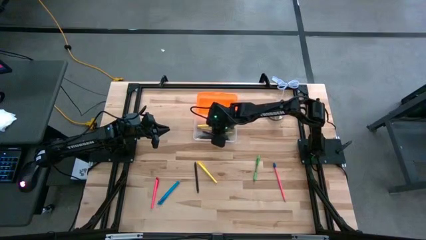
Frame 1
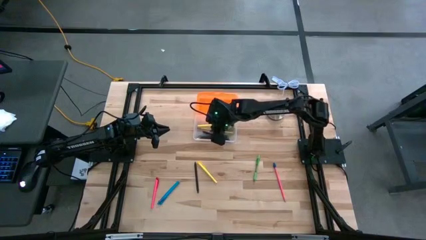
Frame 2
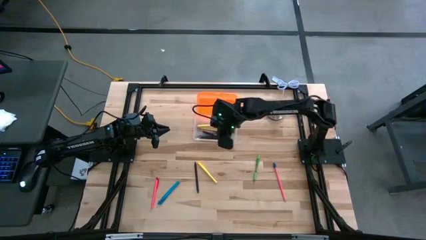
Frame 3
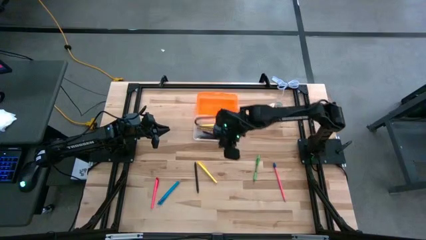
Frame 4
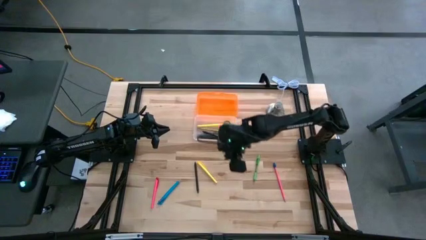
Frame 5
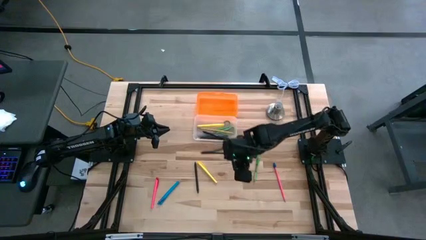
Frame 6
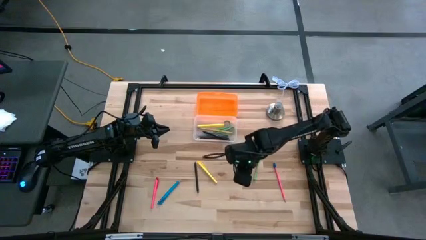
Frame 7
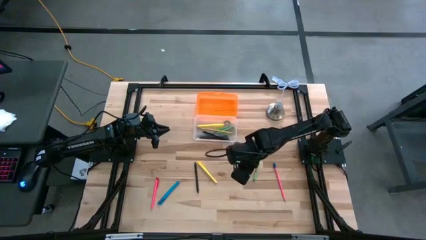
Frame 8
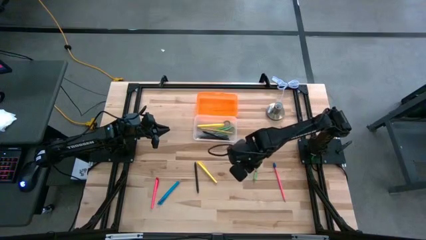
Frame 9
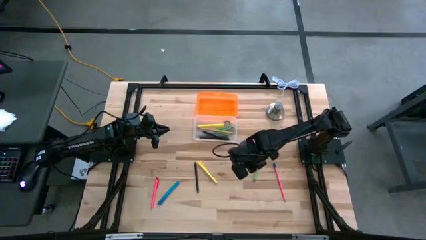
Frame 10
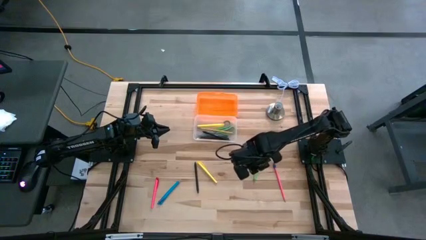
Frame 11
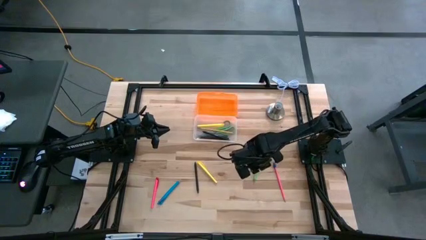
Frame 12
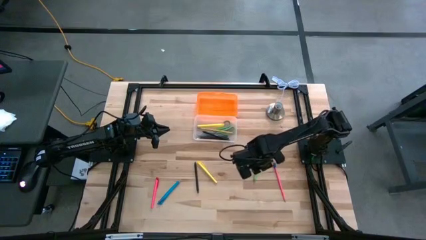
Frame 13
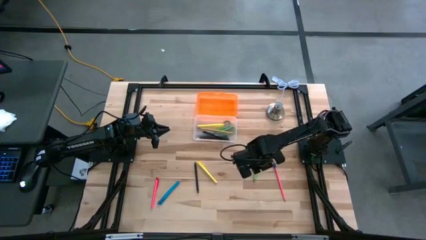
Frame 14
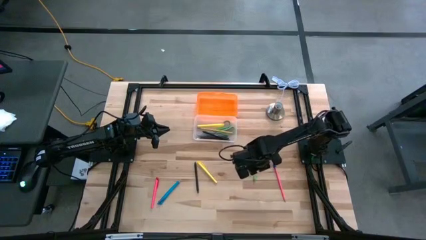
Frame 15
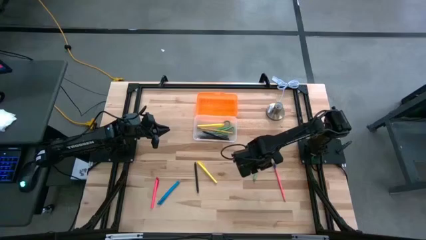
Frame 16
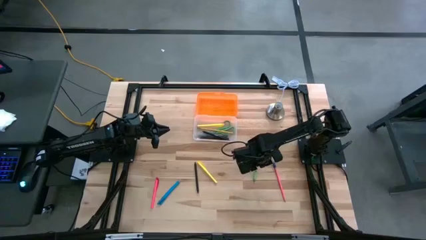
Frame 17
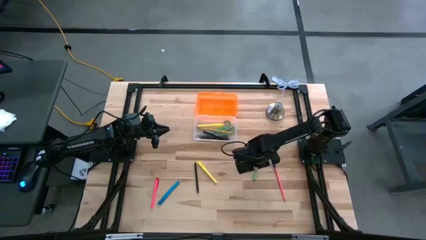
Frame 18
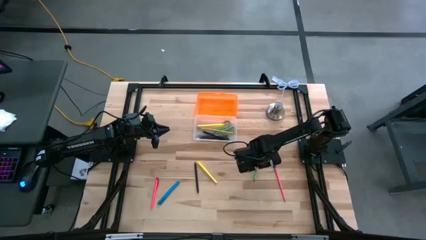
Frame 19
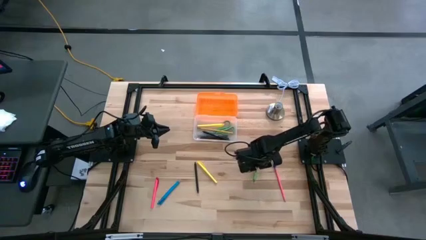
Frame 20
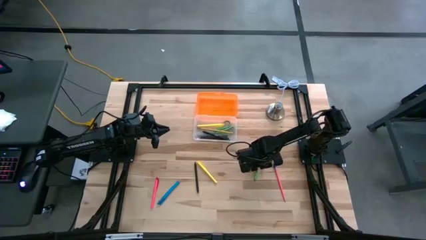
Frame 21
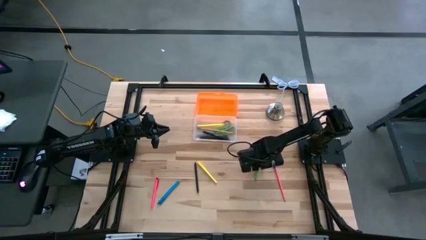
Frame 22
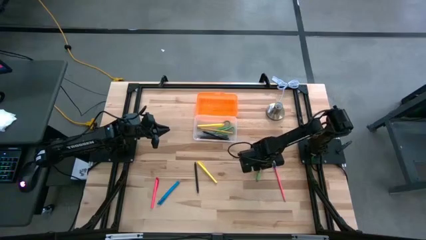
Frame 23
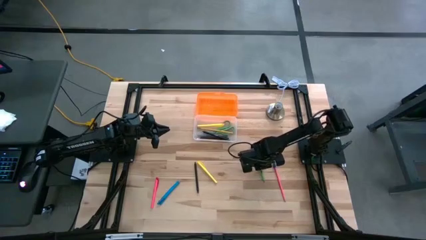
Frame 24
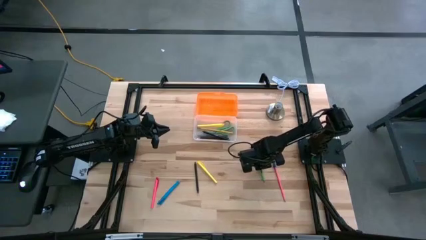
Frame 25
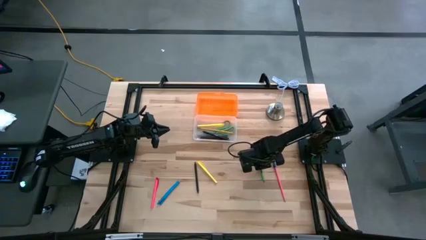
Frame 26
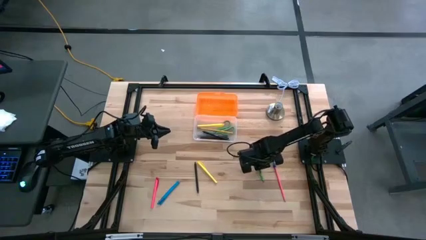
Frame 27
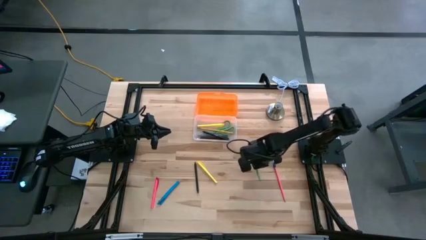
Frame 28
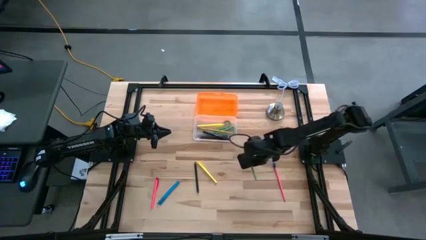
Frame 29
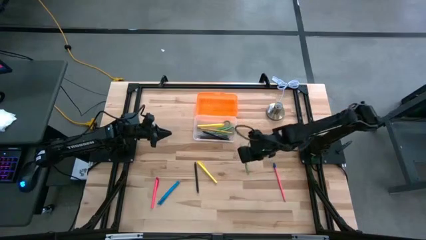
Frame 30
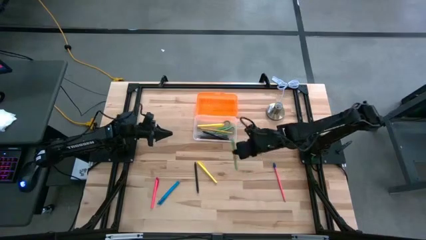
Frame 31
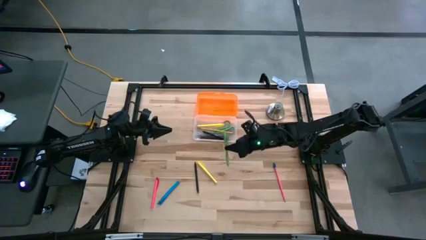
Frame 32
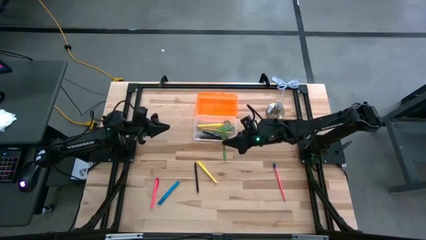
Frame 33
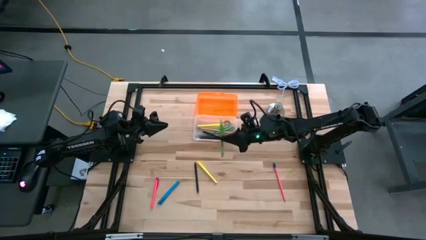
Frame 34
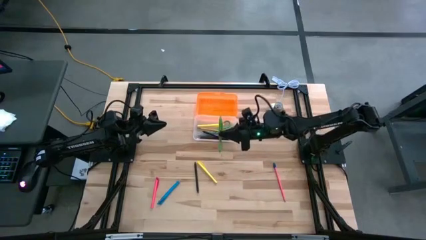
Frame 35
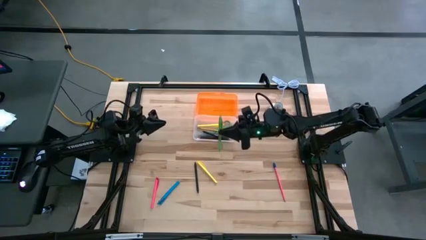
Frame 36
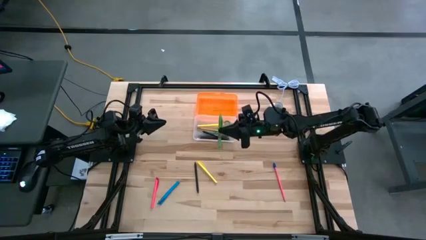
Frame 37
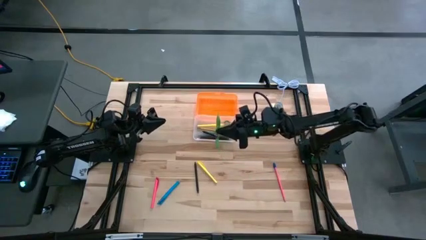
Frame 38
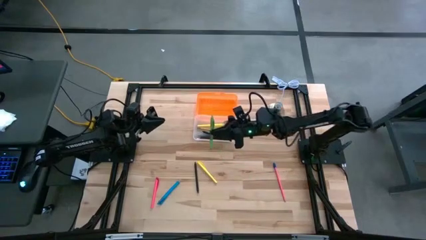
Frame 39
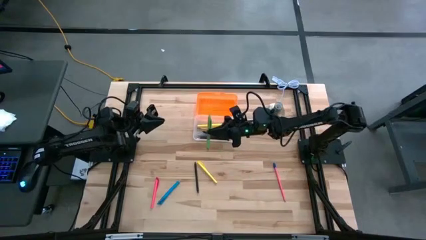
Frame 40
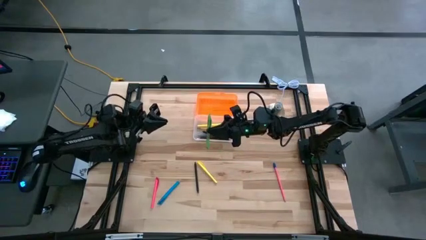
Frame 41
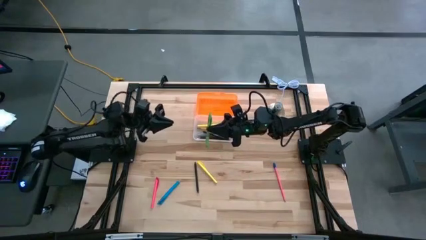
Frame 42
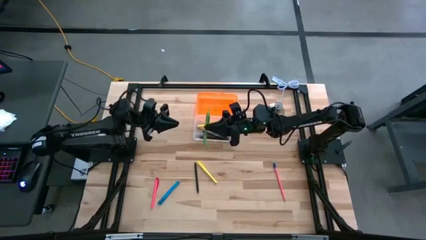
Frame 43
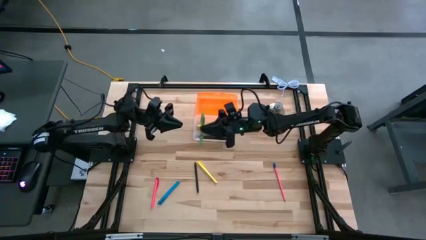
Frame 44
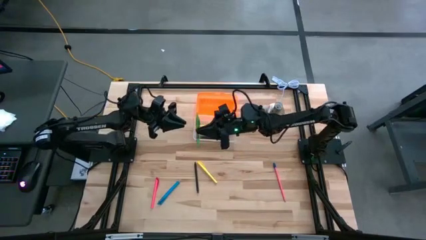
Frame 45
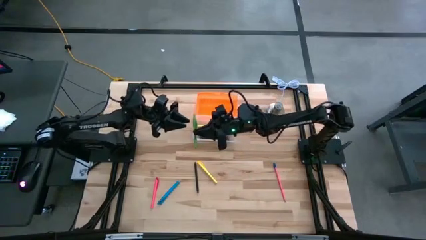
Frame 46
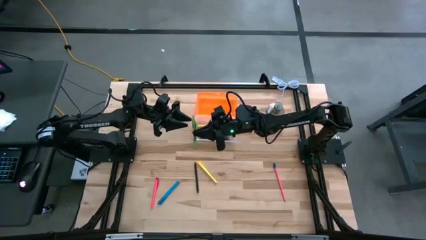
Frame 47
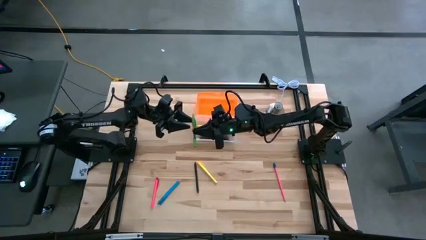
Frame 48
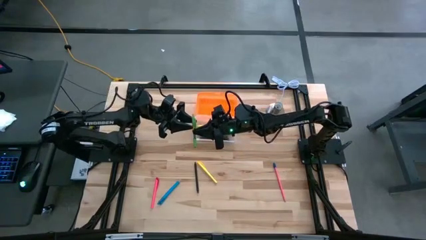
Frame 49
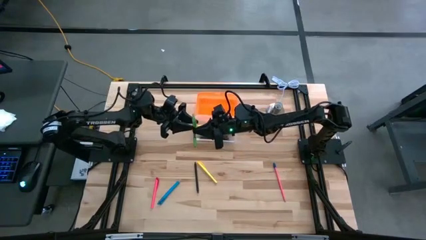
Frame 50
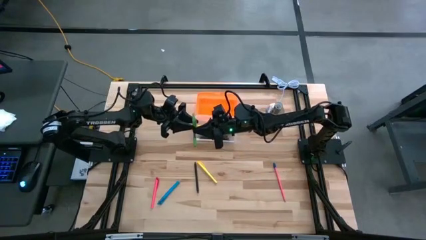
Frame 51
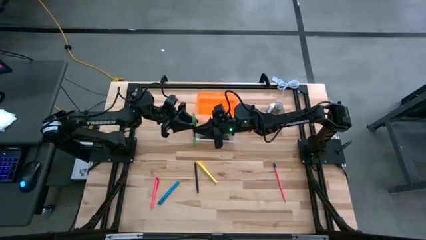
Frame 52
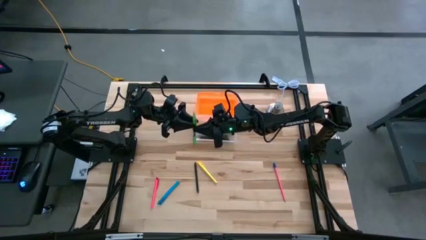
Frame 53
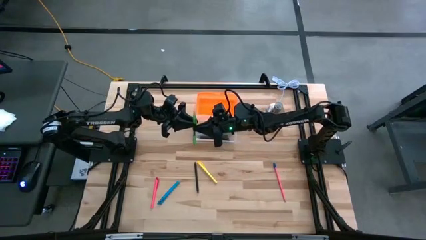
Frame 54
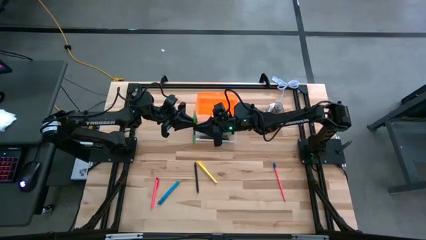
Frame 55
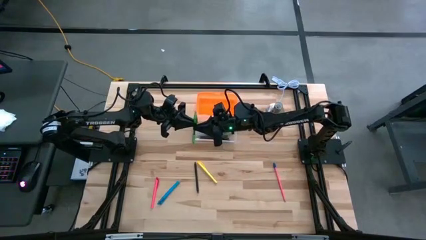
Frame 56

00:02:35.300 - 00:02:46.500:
Task: Pick & place school supplies into a supply box
Put the green pen into the orange supply box

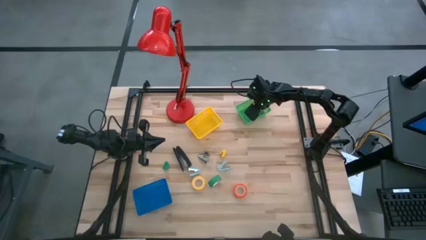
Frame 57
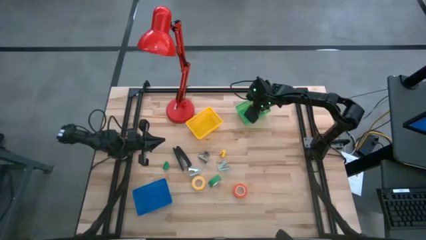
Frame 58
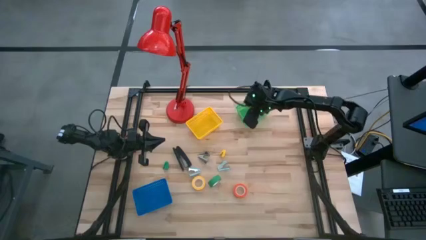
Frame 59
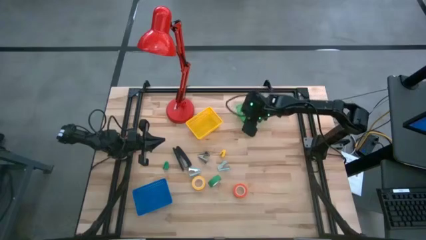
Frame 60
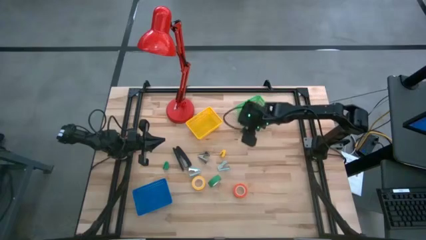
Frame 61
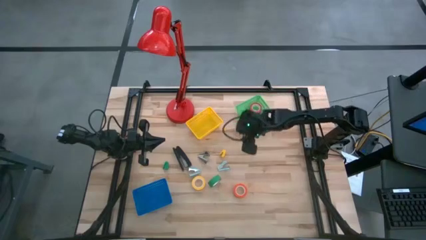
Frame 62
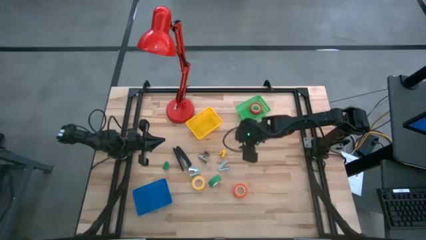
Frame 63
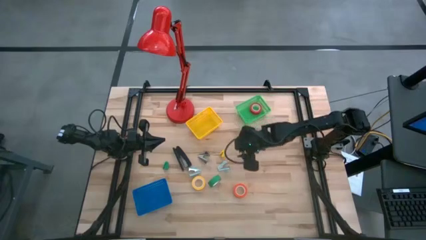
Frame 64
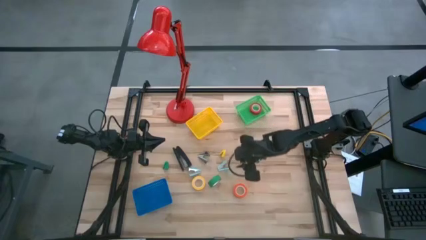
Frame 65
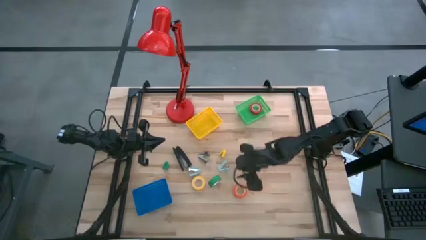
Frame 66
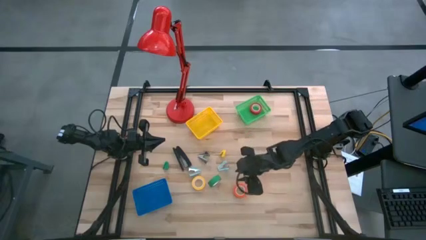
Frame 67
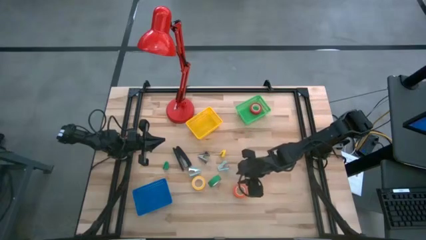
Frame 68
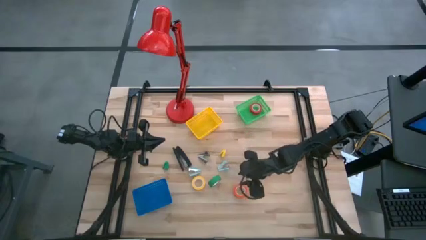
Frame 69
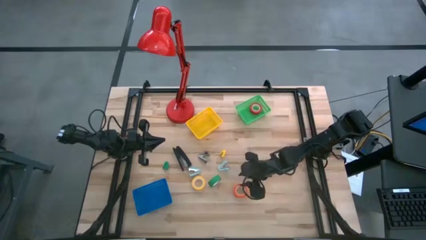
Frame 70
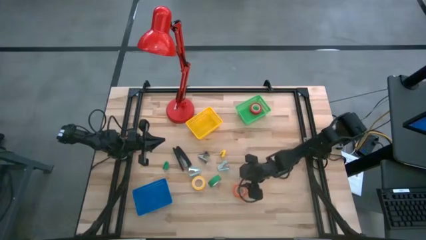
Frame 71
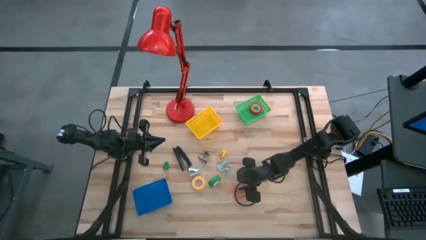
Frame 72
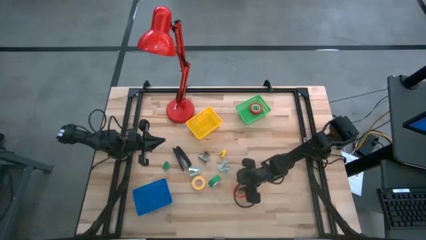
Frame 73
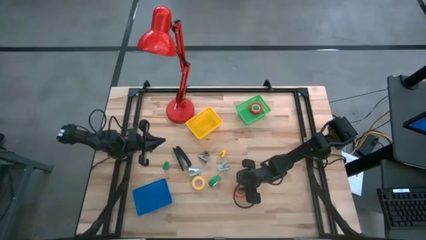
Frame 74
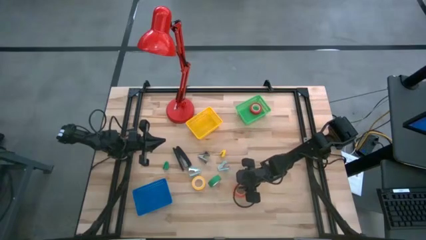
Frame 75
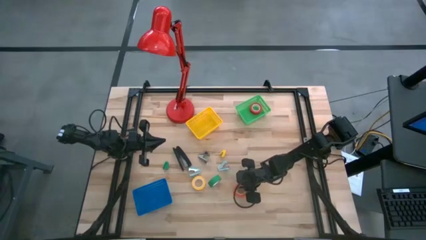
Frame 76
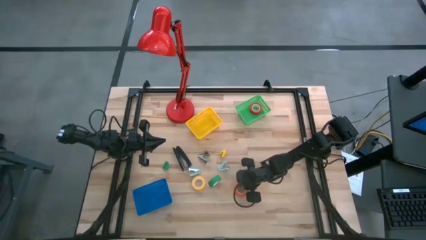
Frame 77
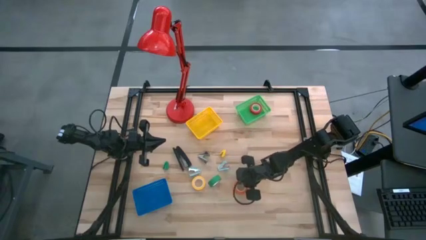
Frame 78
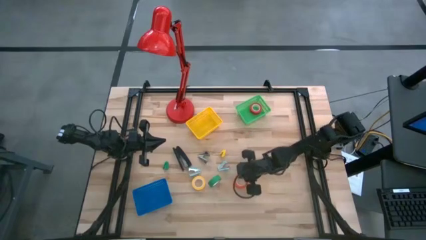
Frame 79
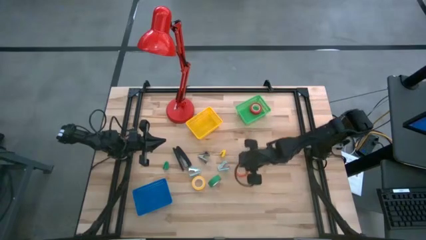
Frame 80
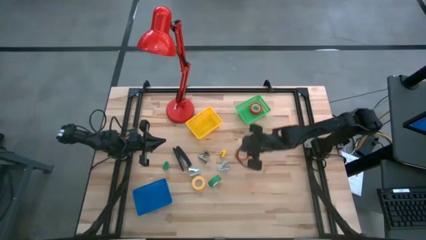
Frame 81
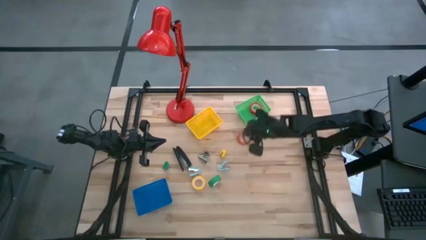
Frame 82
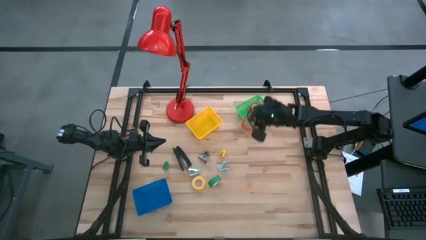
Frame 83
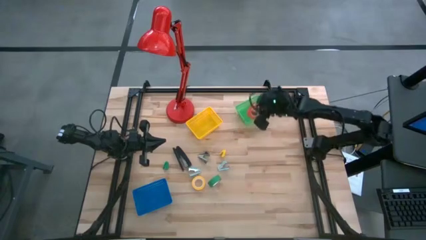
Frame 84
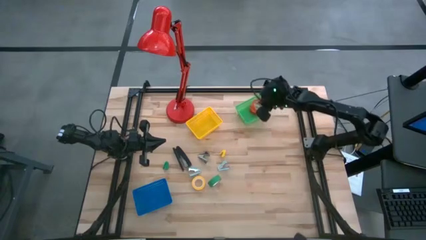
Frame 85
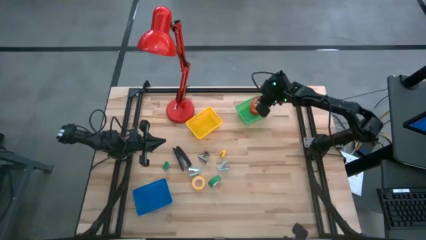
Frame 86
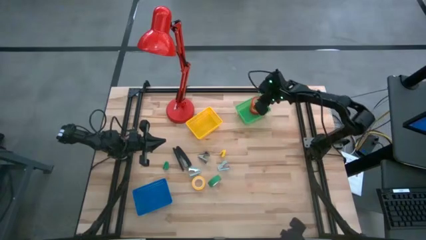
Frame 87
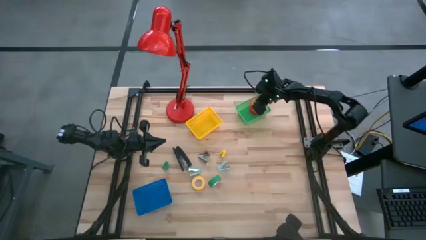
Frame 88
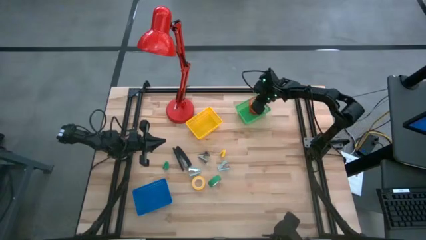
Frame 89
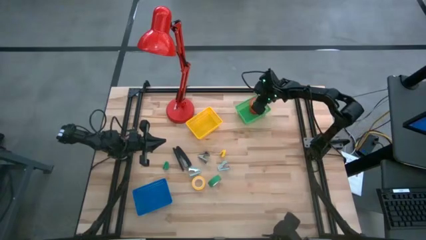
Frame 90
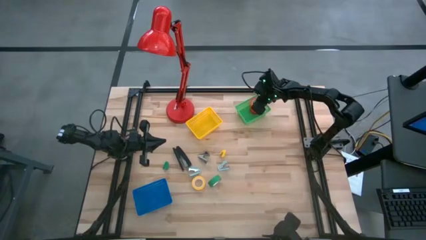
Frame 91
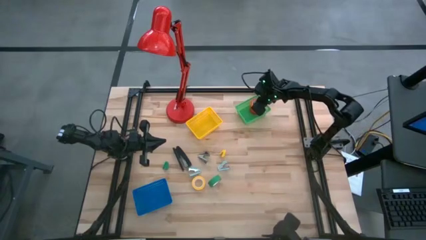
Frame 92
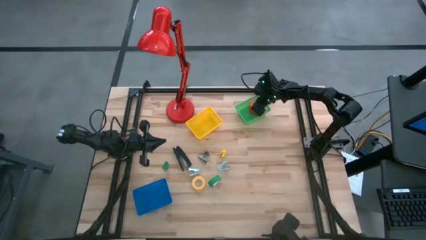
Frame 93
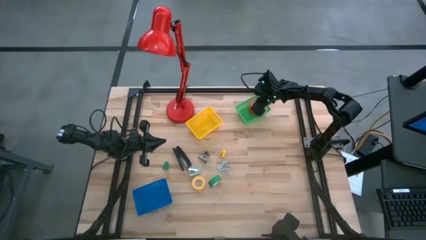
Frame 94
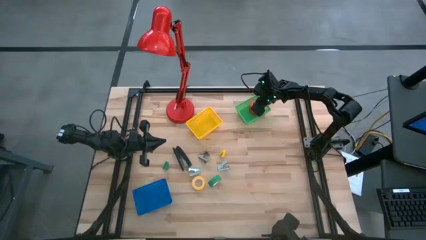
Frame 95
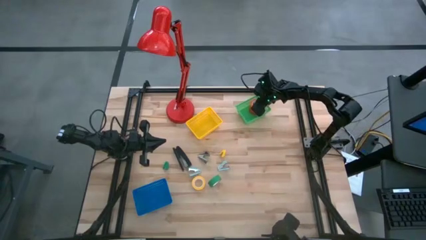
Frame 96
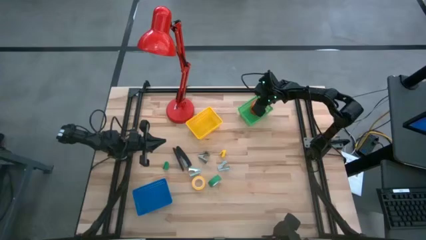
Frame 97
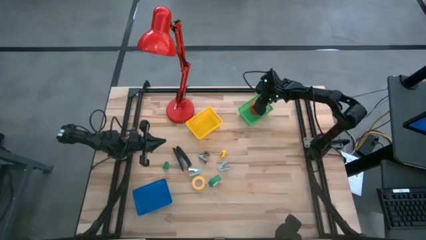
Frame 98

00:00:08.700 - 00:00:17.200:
Task: Pick and place Stapler, Stapler remover, tape
Put the orange tape into the green bin
